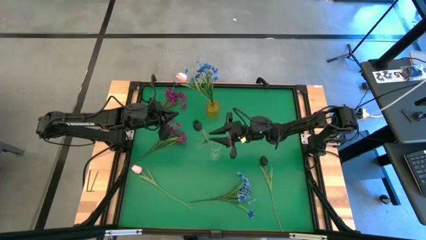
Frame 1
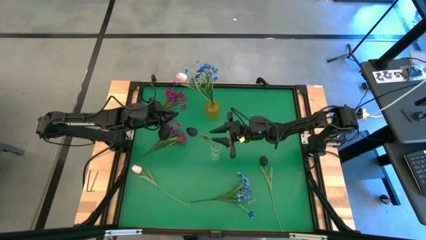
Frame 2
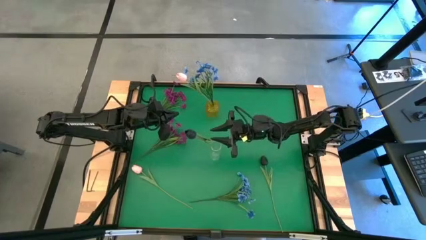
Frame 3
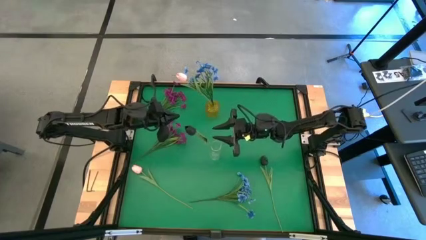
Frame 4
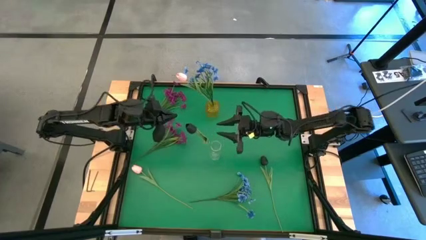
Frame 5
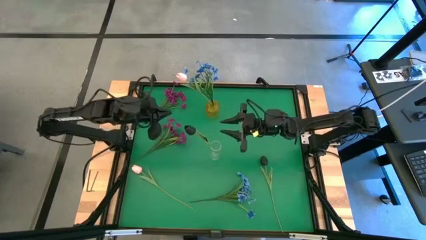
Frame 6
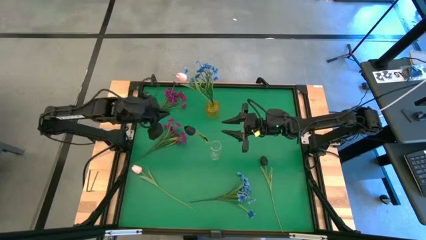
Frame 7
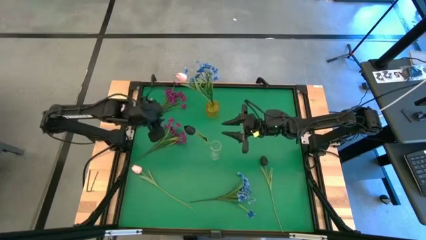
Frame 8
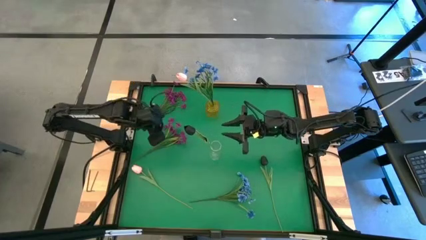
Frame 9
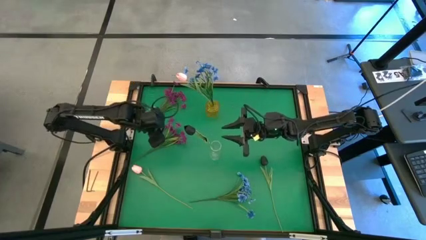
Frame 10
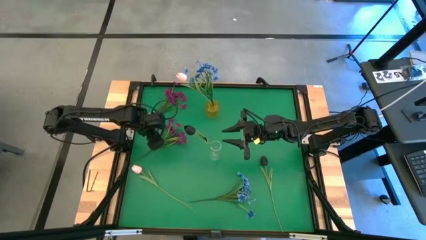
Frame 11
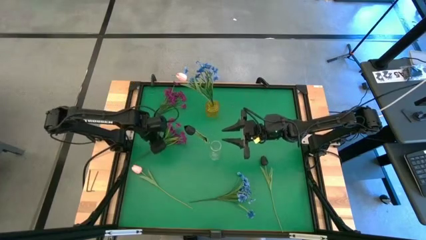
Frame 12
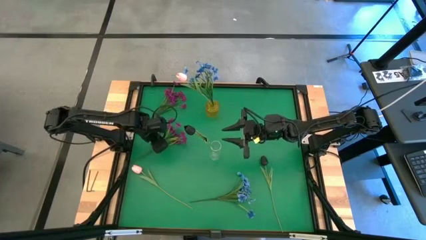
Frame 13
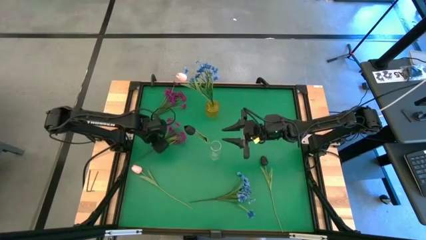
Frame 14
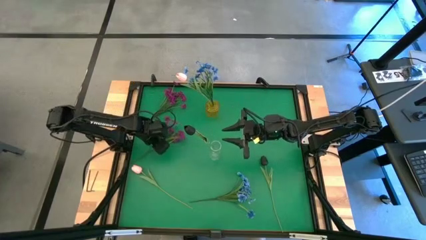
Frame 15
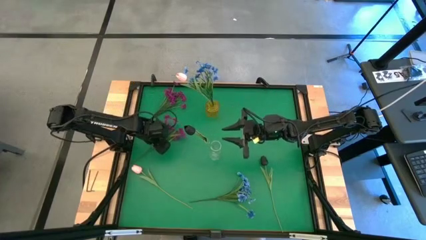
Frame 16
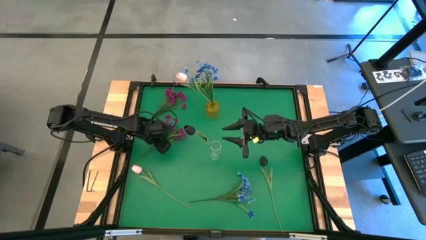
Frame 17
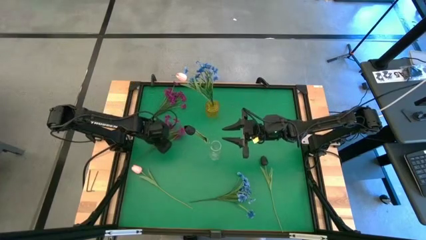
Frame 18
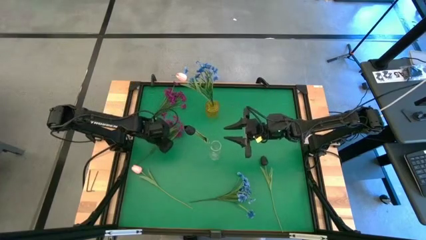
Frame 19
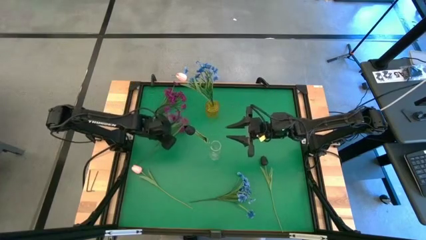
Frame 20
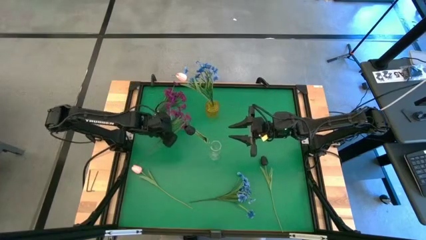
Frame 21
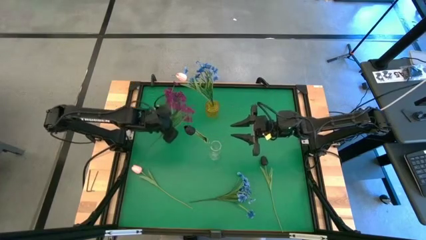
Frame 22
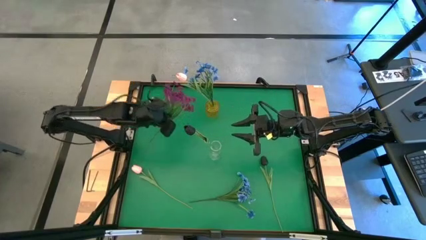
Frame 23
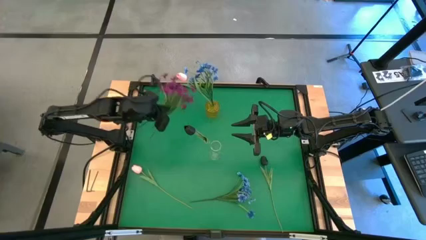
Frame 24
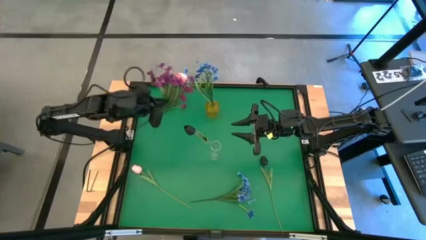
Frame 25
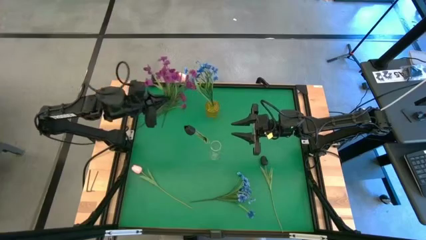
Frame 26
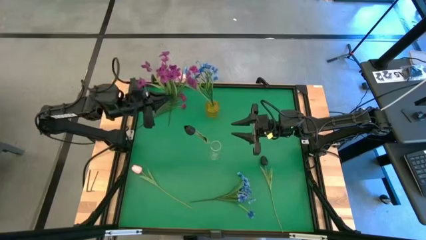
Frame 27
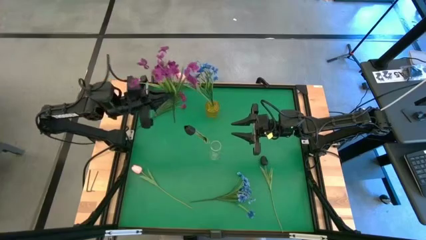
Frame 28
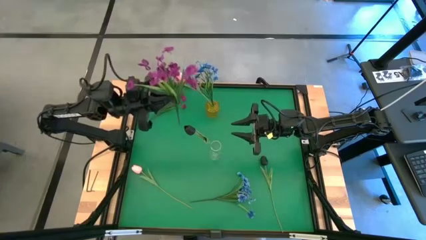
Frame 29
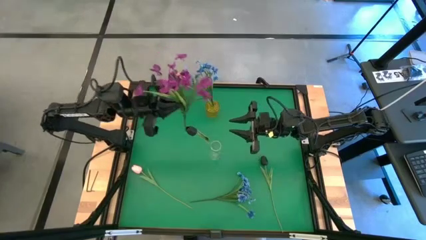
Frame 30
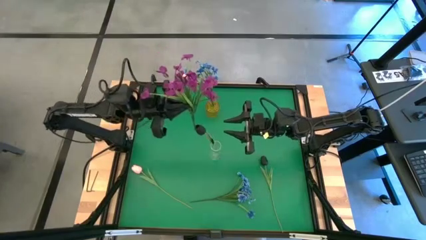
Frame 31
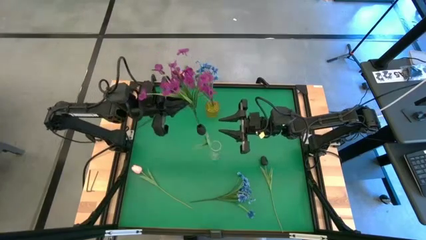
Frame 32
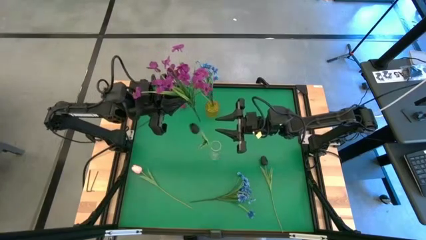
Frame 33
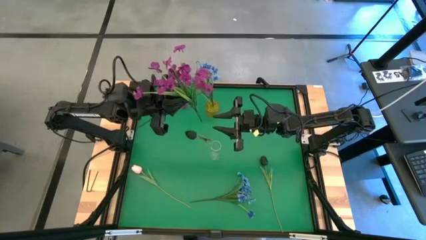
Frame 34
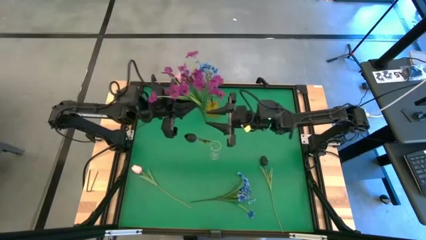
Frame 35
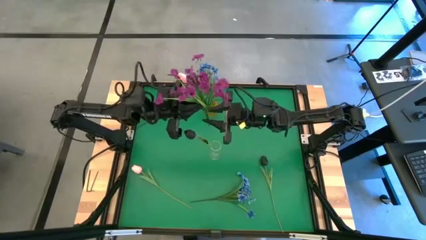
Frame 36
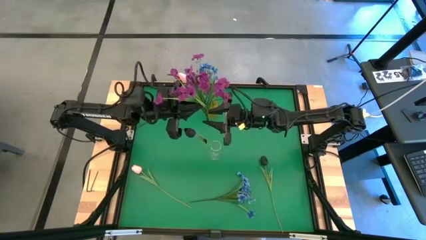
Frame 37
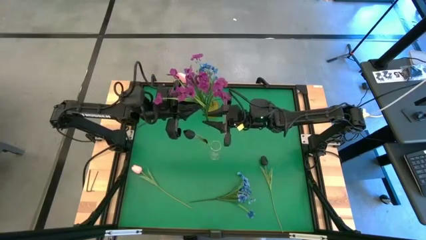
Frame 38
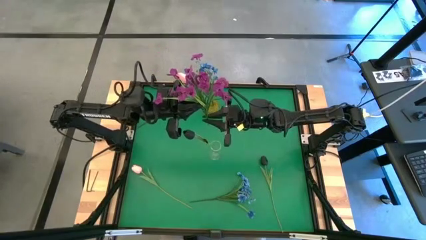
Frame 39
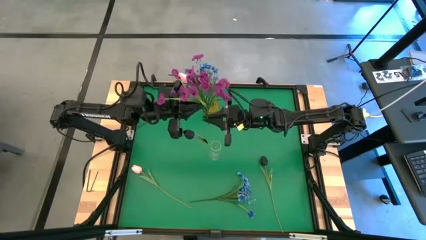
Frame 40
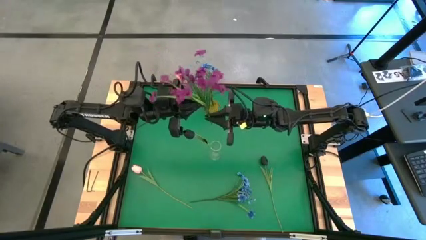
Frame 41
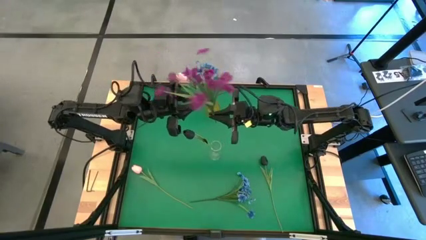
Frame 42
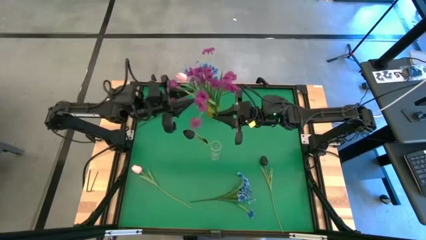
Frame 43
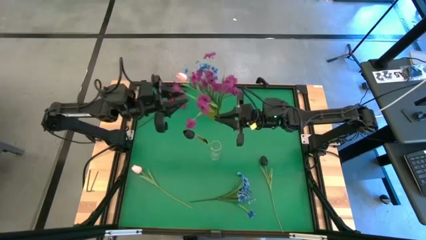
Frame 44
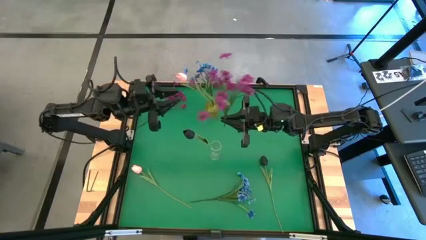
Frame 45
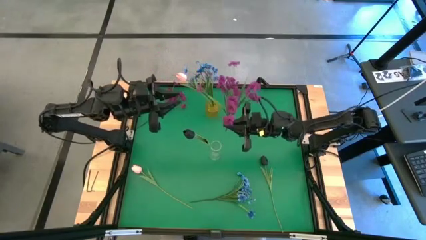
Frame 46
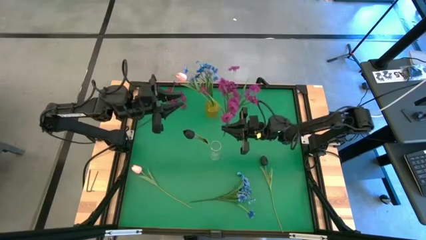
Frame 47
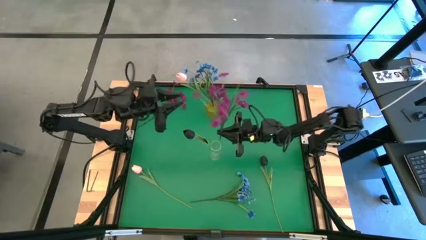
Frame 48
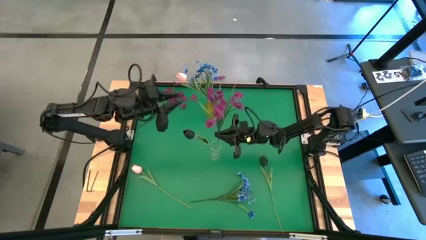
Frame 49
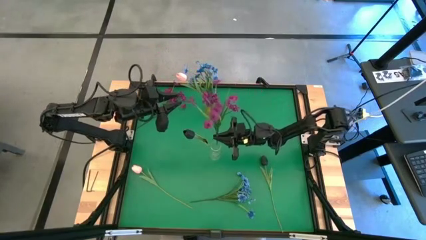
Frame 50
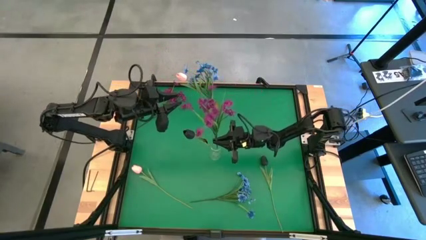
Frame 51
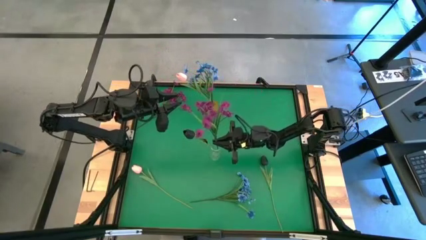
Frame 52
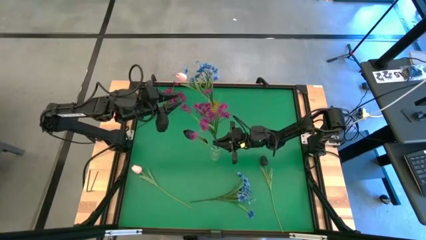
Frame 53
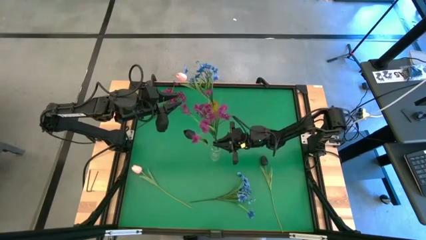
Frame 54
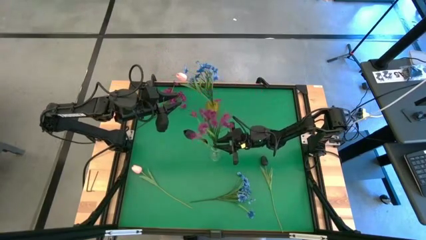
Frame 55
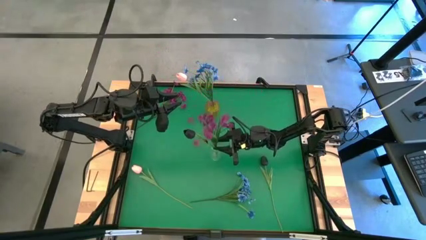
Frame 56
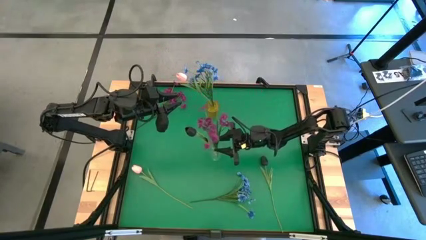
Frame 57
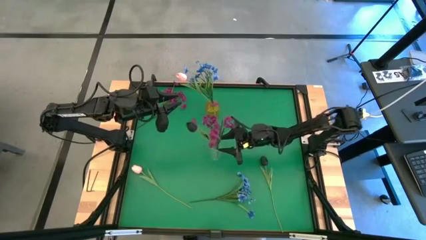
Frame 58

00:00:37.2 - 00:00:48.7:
Task: Sort flowers into vase by color
Put the bottom purple flowers into the transparent vase
